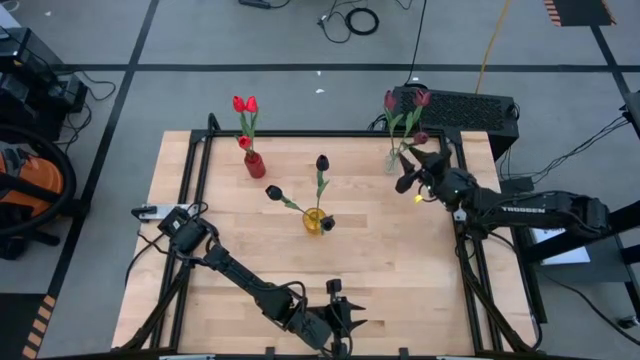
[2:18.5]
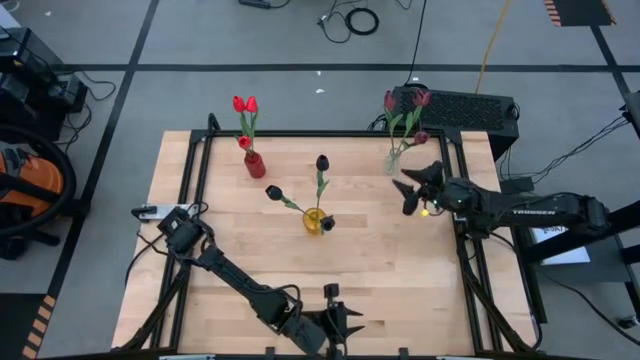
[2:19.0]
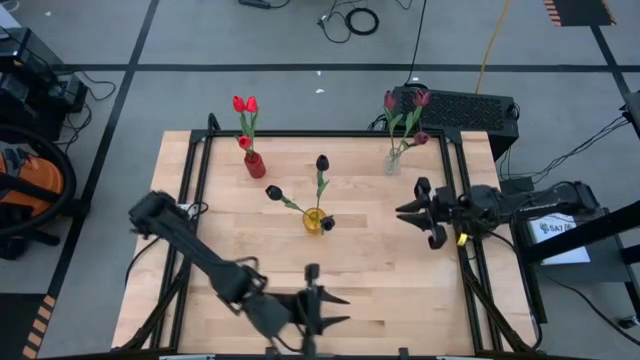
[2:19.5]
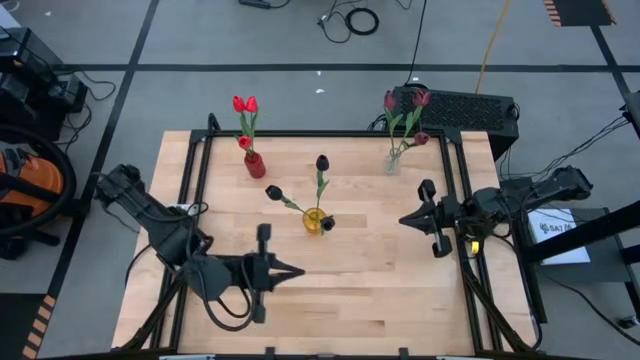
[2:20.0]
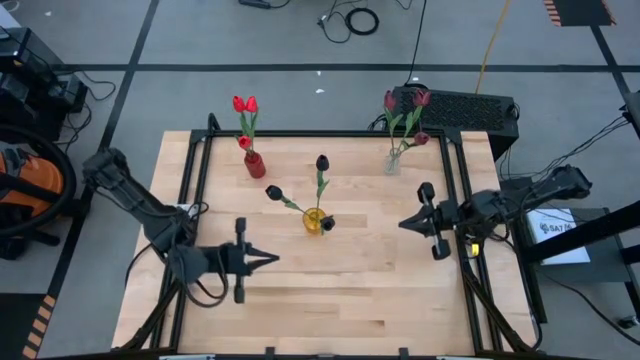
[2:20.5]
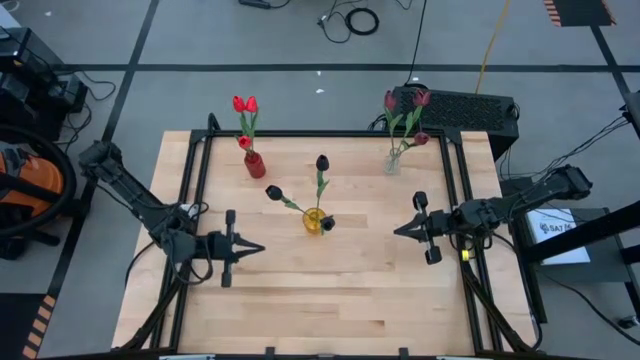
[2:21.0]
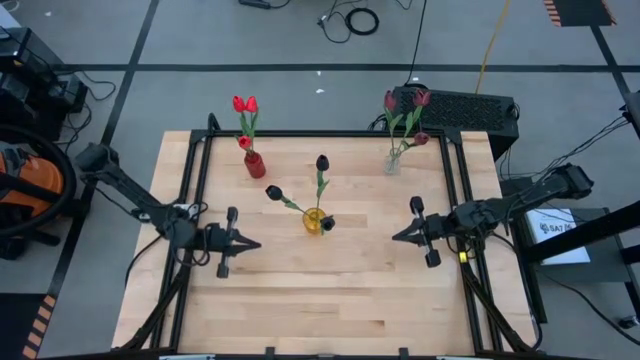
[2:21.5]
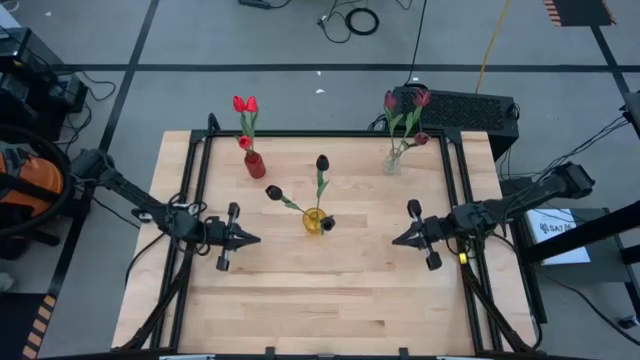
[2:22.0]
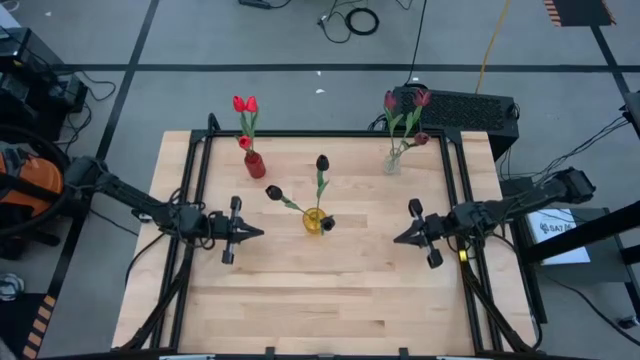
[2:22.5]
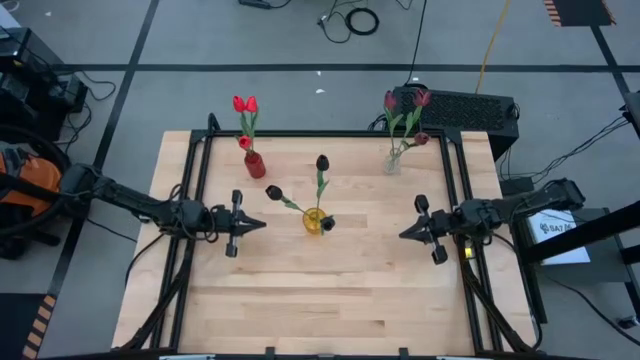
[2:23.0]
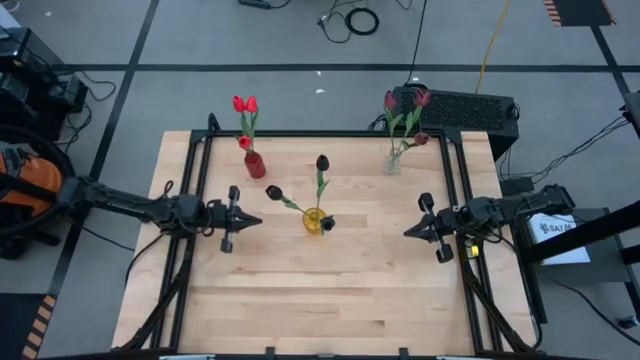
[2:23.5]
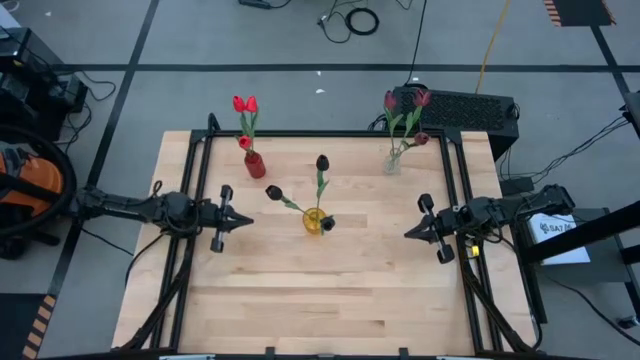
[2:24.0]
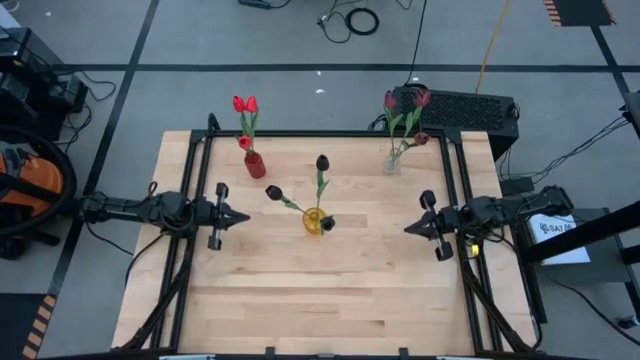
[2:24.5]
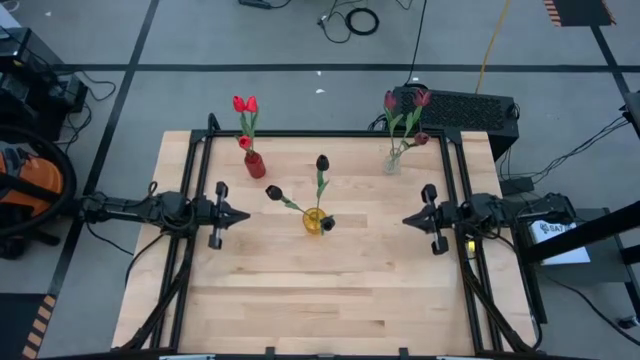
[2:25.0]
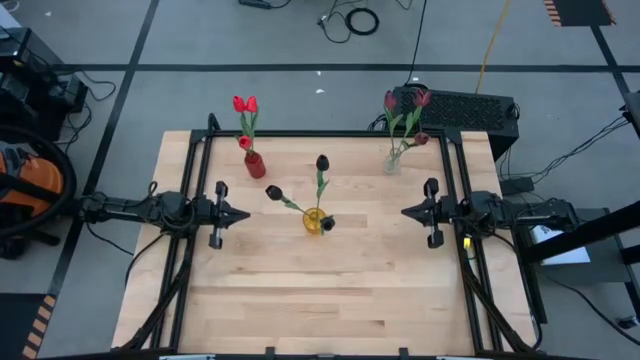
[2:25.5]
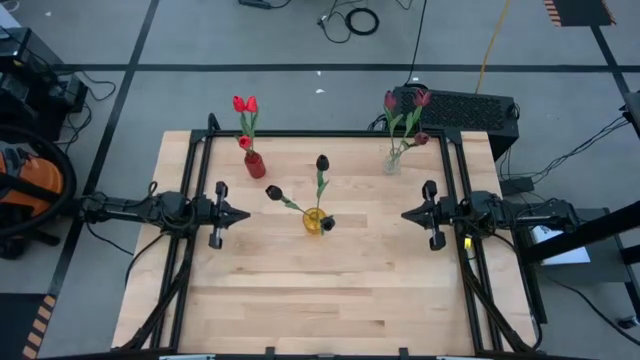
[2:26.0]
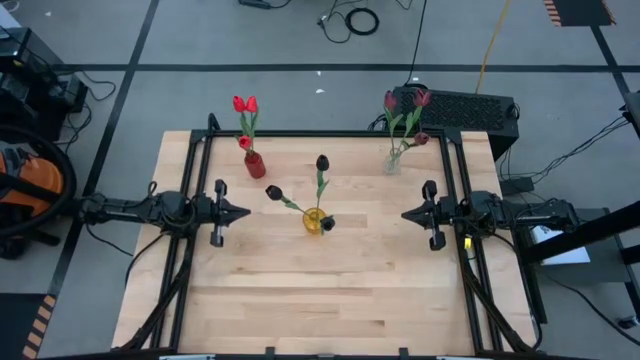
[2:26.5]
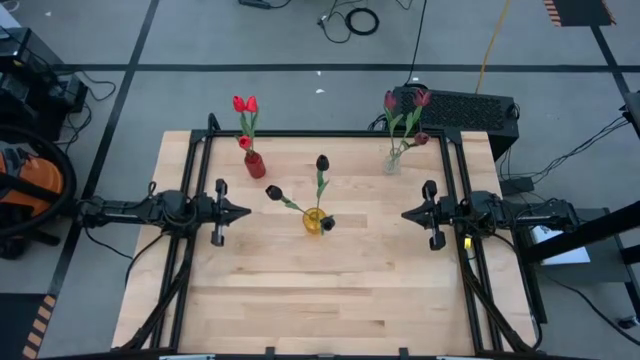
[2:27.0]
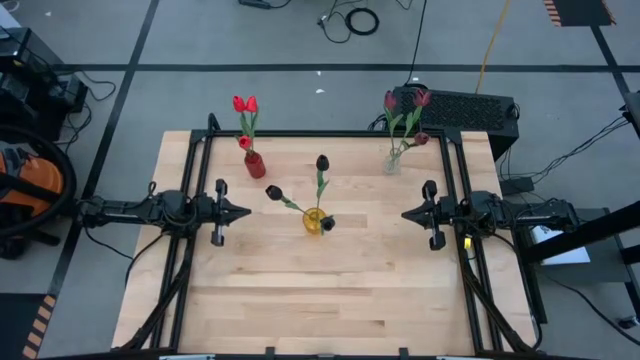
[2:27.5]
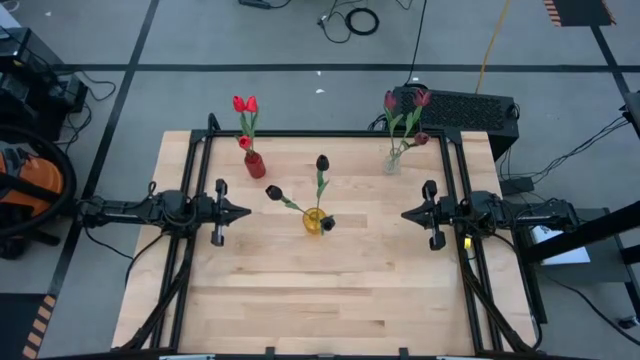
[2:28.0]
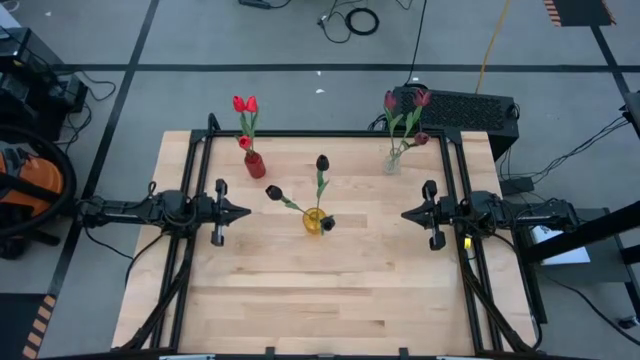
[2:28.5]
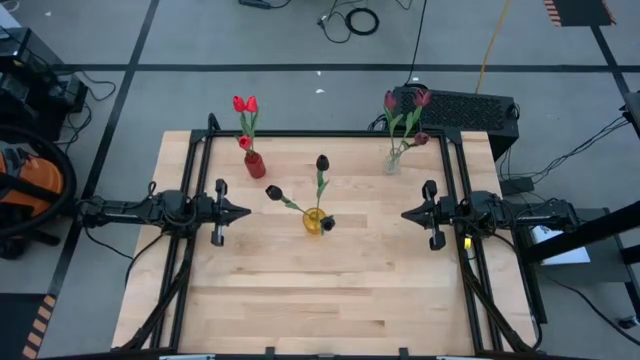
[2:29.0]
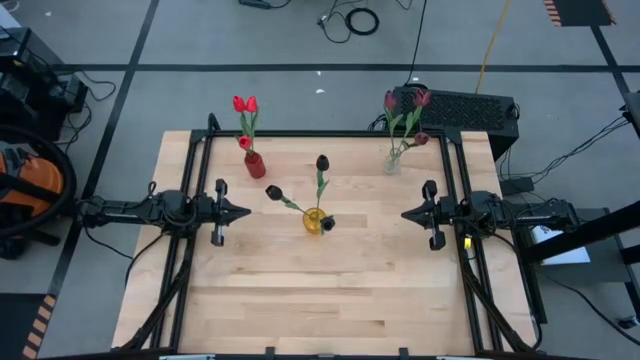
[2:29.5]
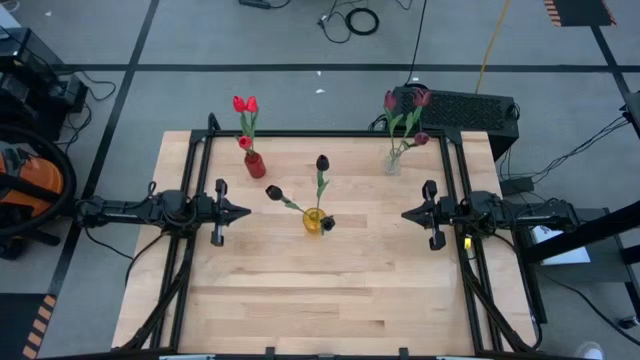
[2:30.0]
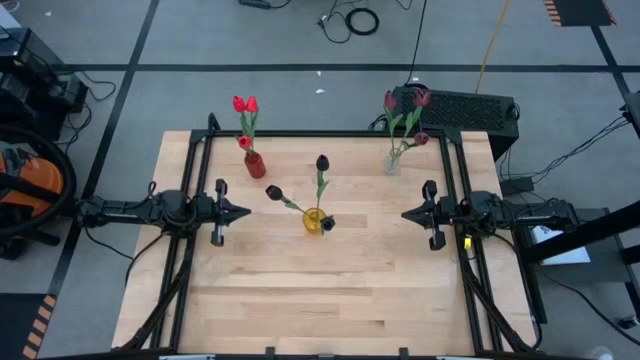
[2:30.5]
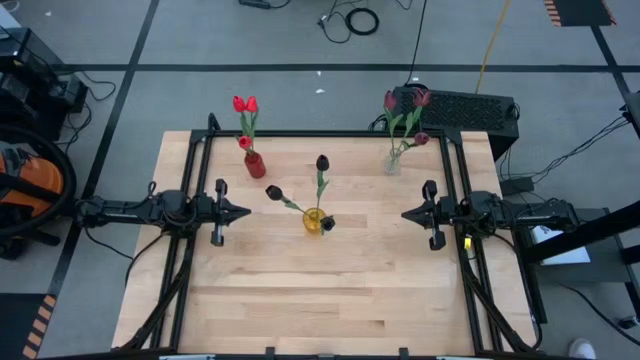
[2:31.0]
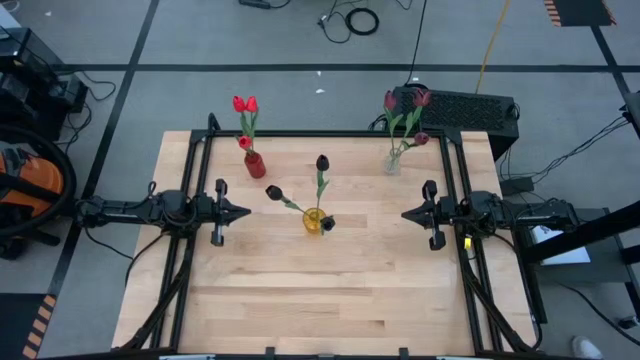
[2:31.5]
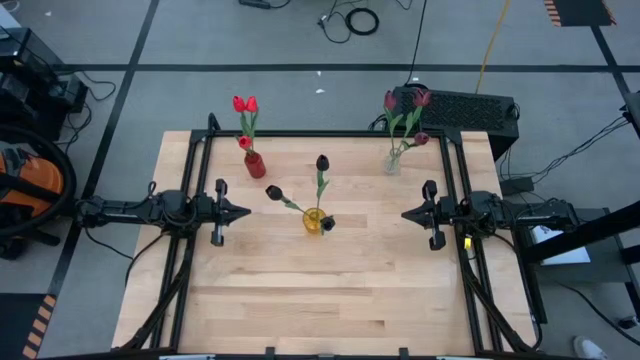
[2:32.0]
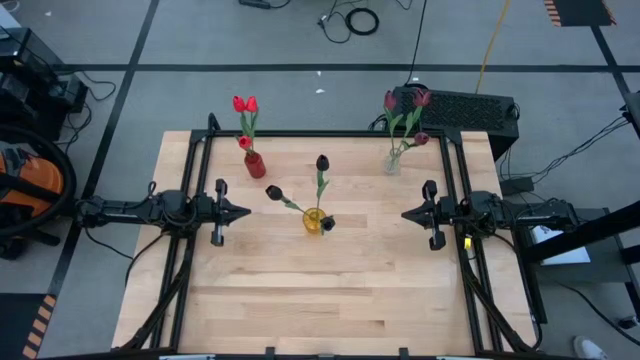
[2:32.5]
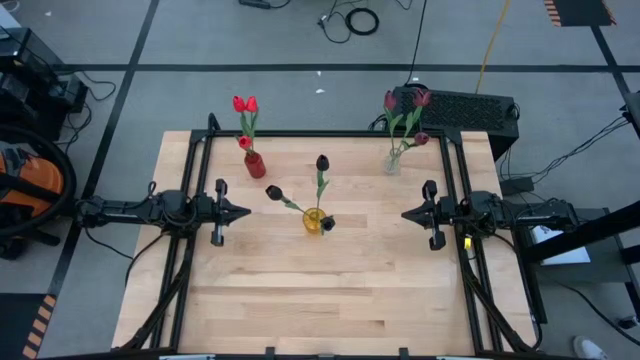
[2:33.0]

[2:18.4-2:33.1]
Task: Sort flowers into vase by color
Return to Home Position

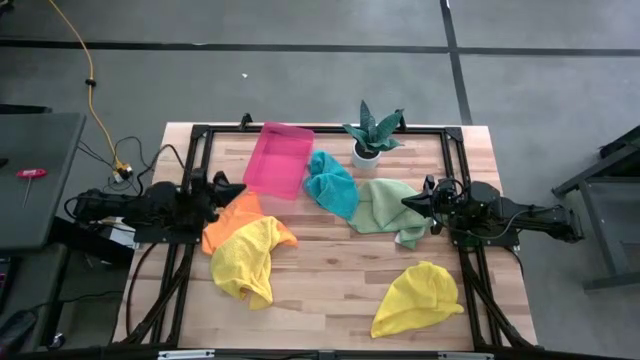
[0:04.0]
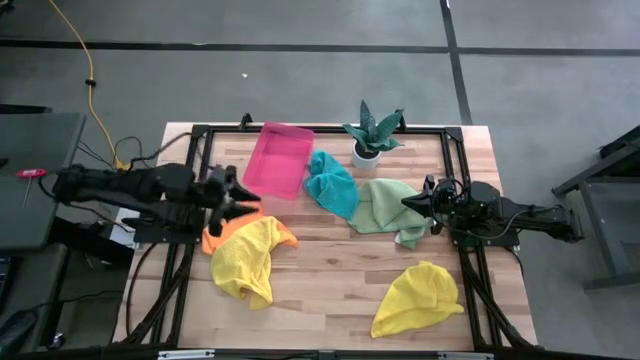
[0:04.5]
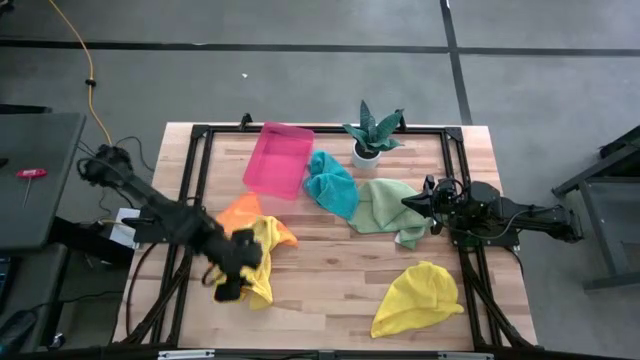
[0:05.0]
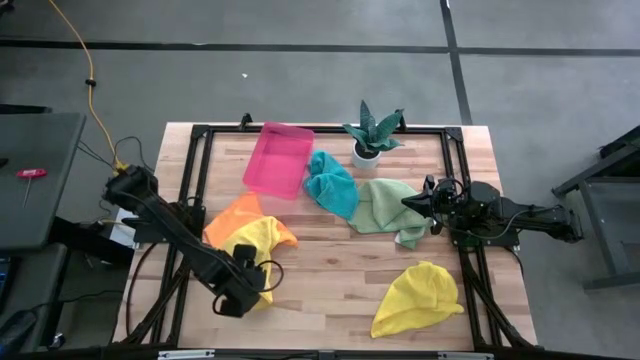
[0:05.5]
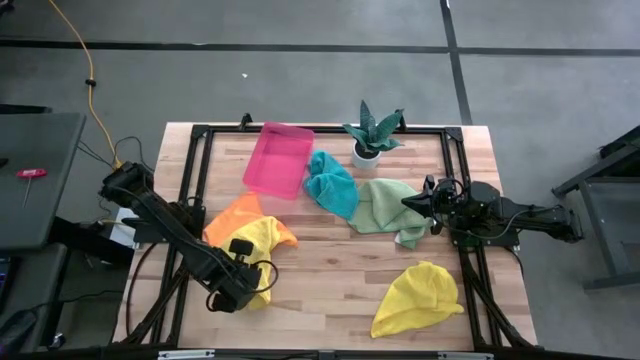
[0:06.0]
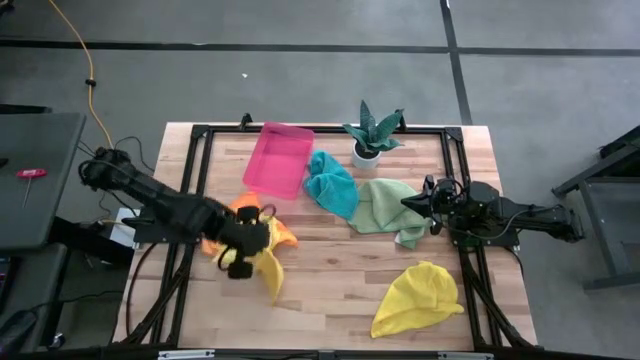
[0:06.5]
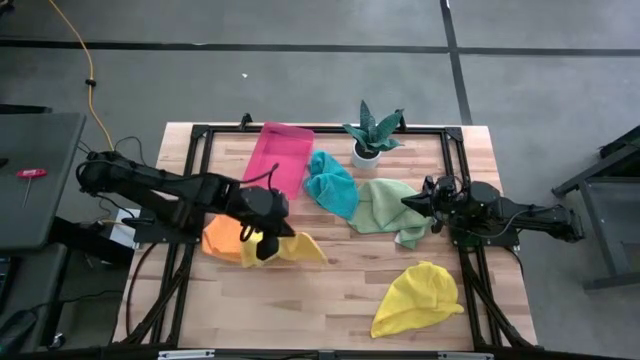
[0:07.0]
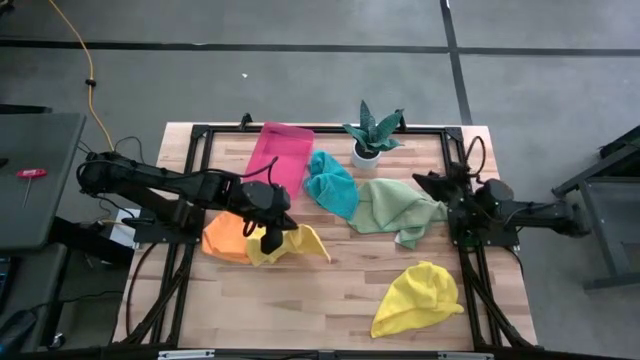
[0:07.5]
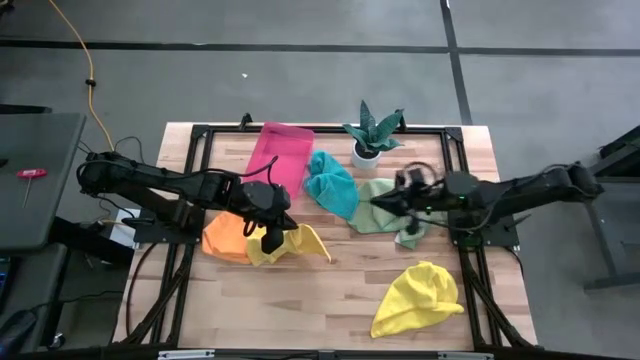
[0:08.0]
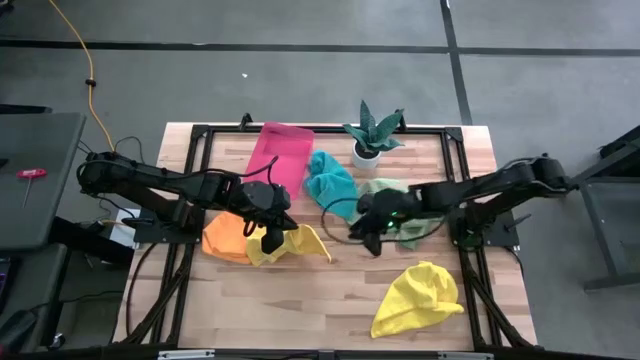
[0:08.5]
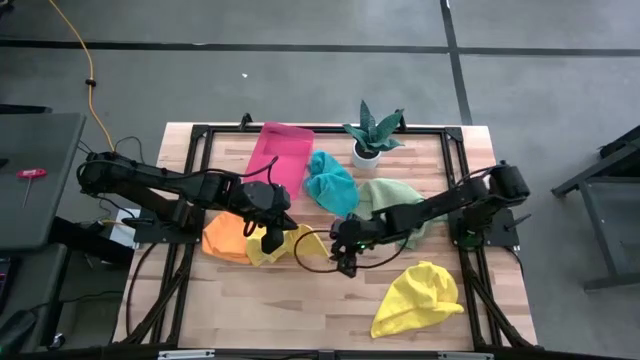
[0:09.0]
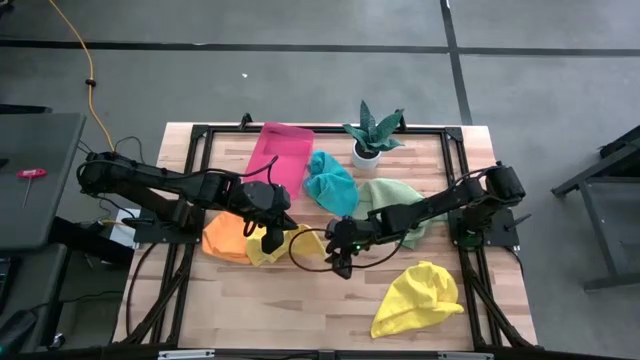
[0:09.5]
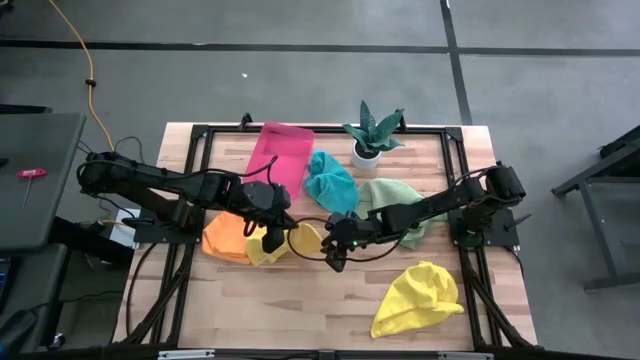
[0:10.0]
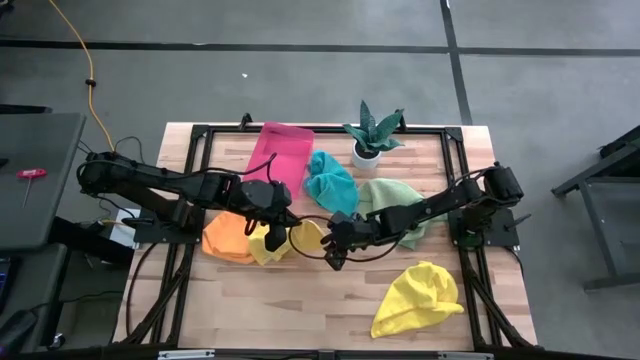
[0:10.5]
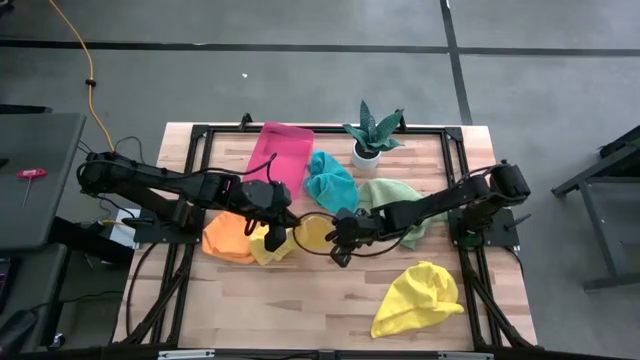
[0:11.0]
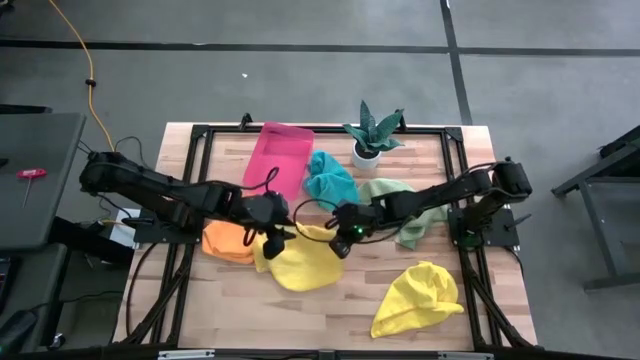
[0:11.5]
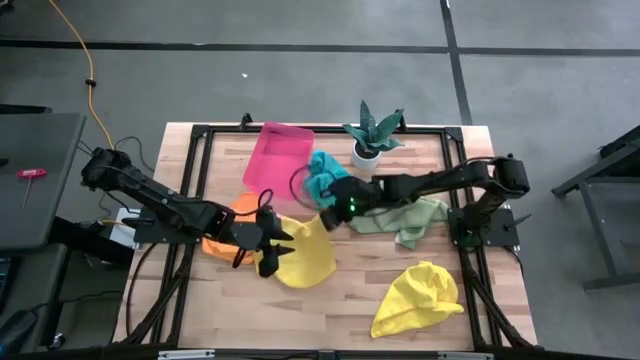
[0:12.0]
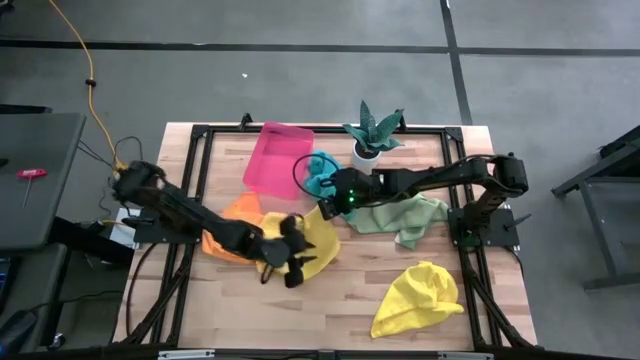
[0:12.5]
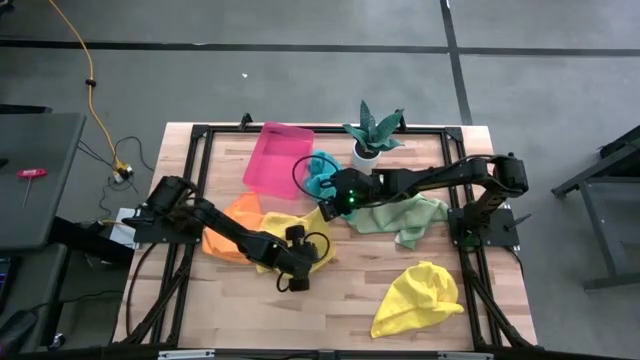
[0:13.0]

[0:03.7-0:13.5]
Task: Fold microfiber towels
Fold the left yellow microfiber cloth
